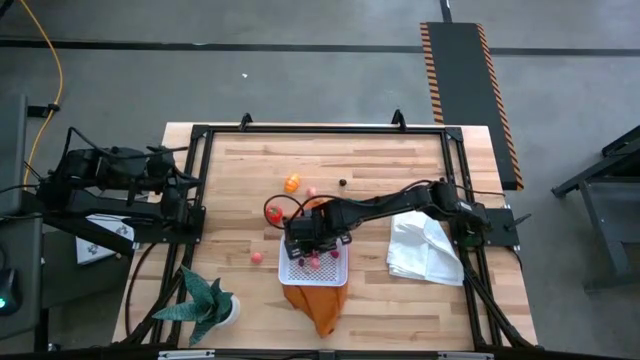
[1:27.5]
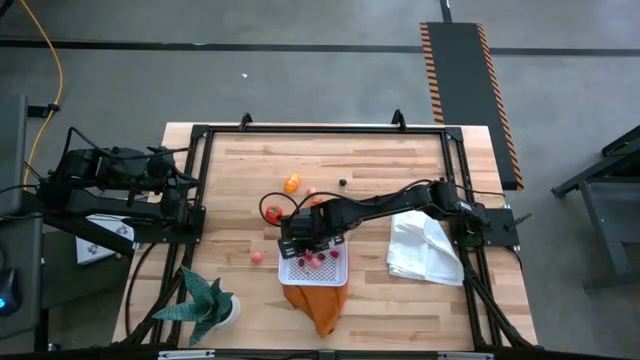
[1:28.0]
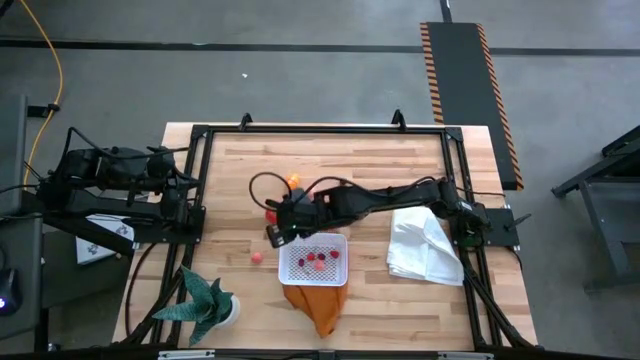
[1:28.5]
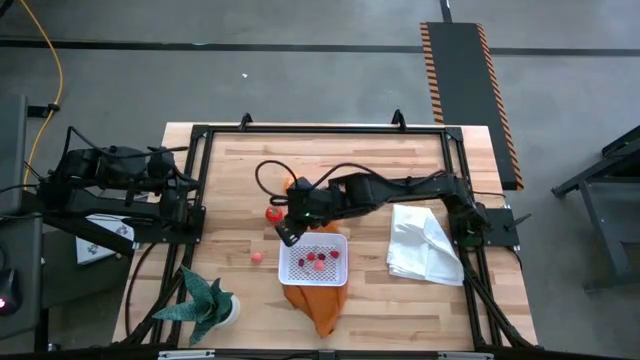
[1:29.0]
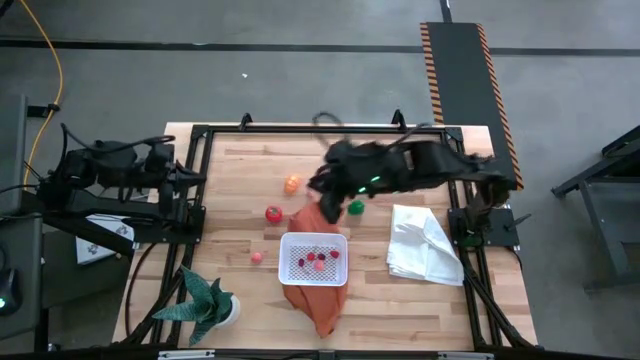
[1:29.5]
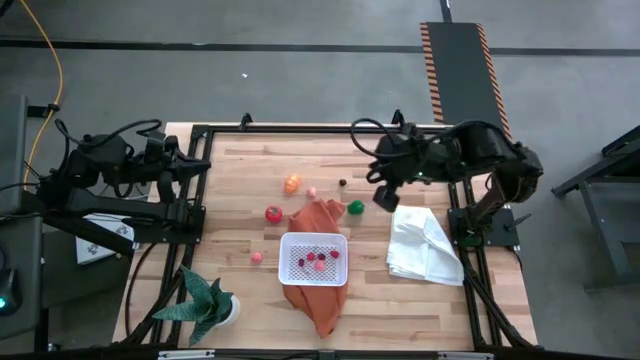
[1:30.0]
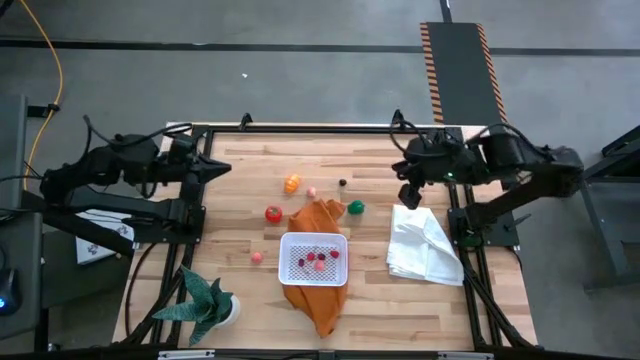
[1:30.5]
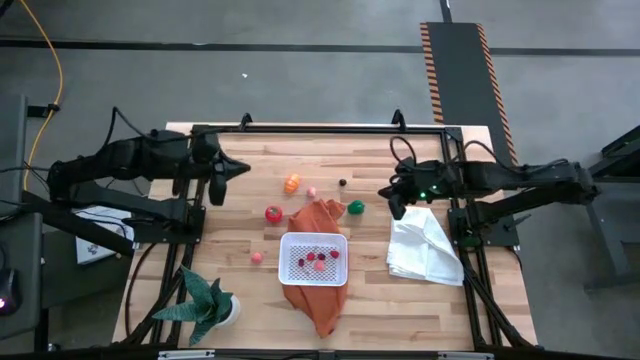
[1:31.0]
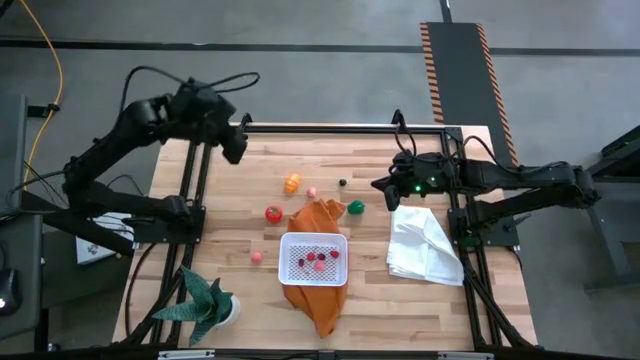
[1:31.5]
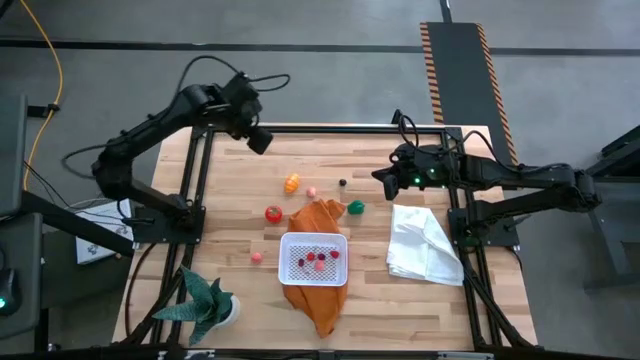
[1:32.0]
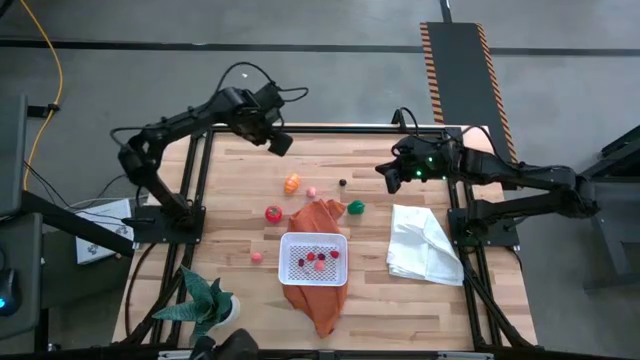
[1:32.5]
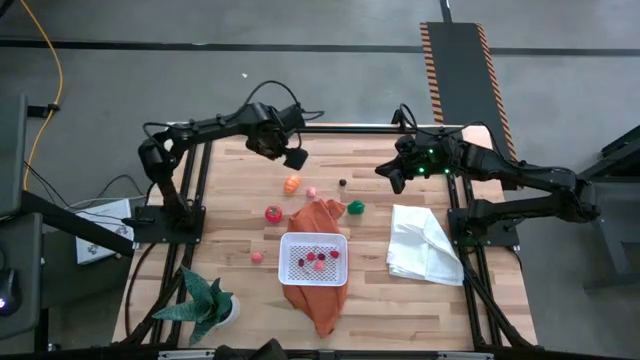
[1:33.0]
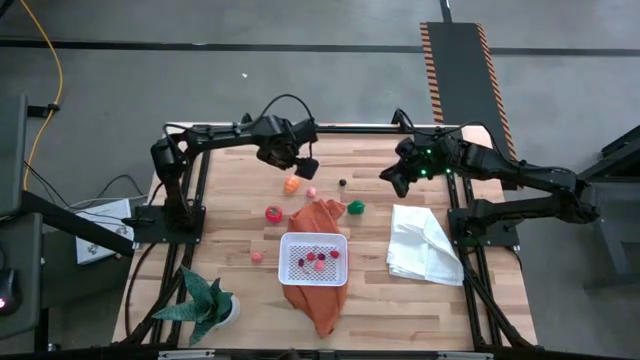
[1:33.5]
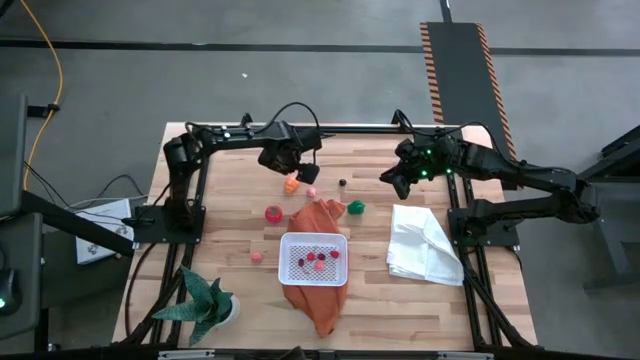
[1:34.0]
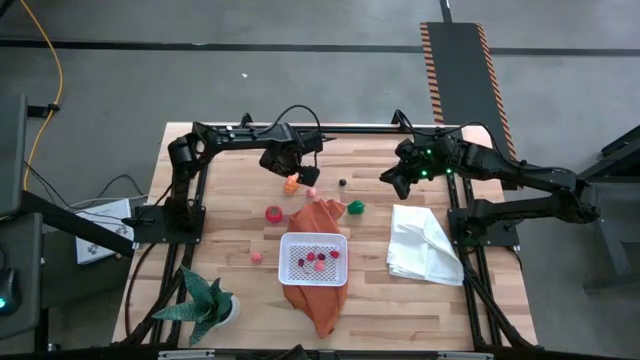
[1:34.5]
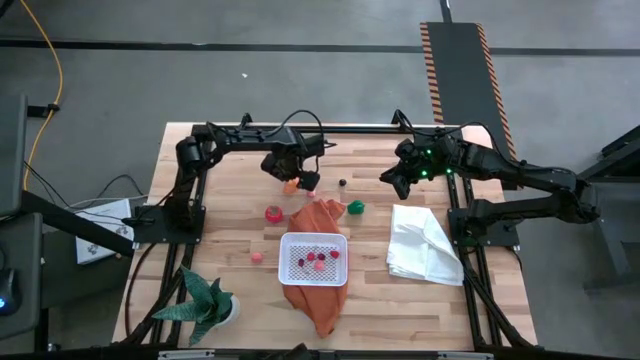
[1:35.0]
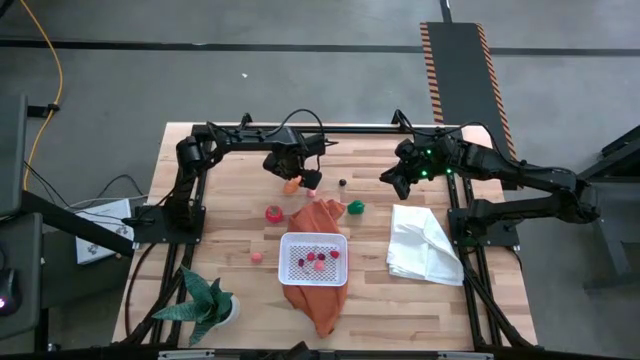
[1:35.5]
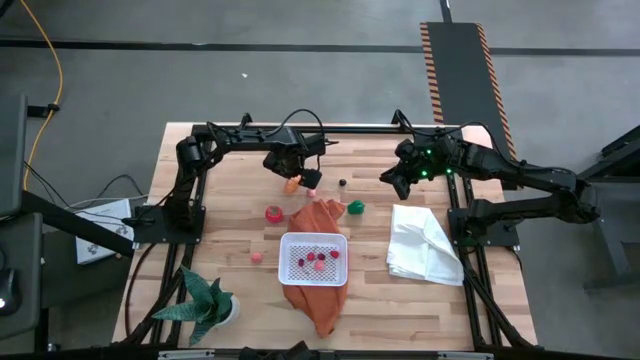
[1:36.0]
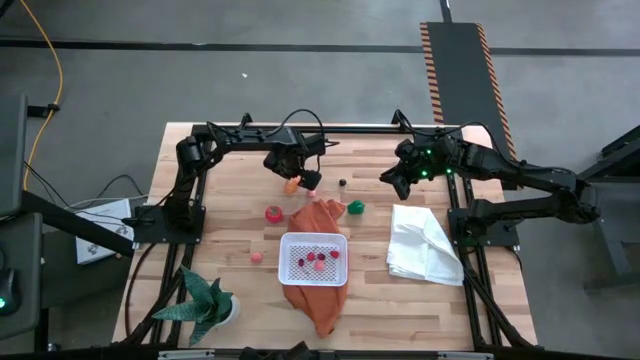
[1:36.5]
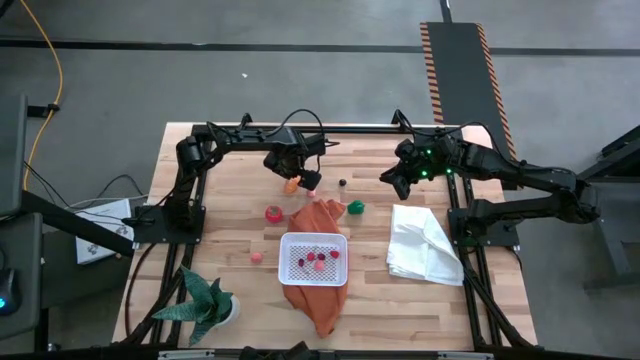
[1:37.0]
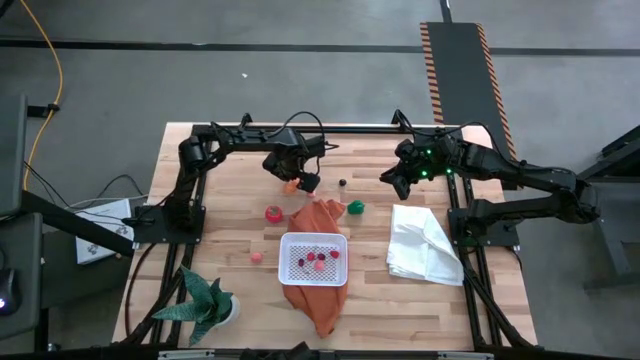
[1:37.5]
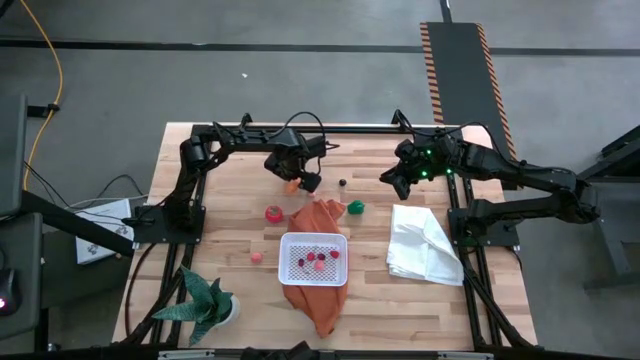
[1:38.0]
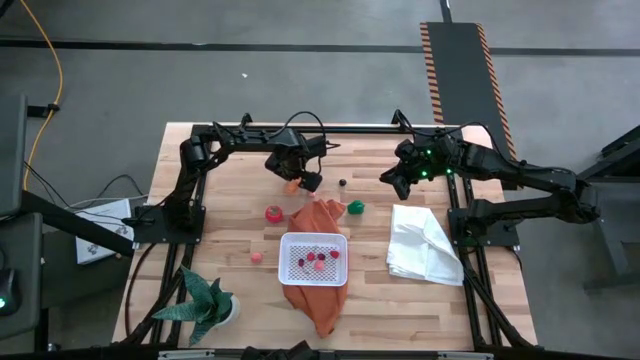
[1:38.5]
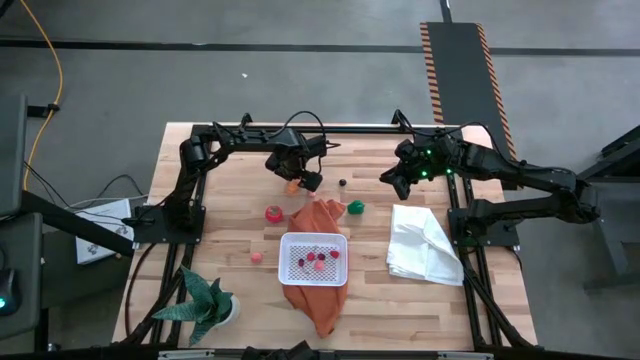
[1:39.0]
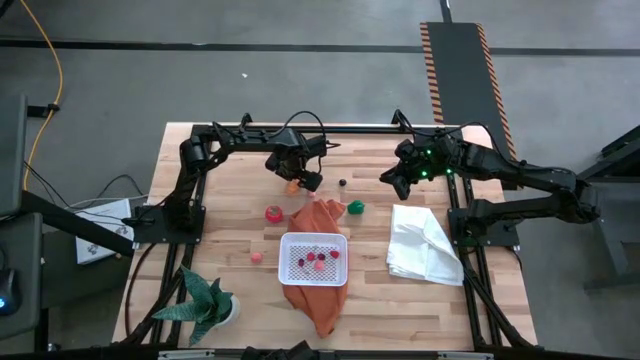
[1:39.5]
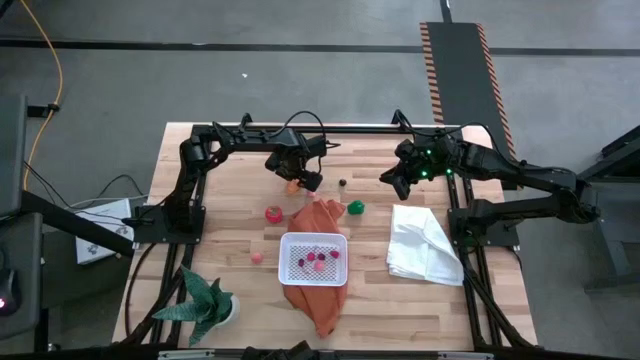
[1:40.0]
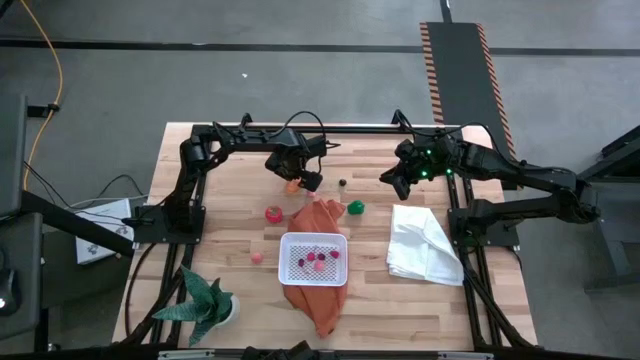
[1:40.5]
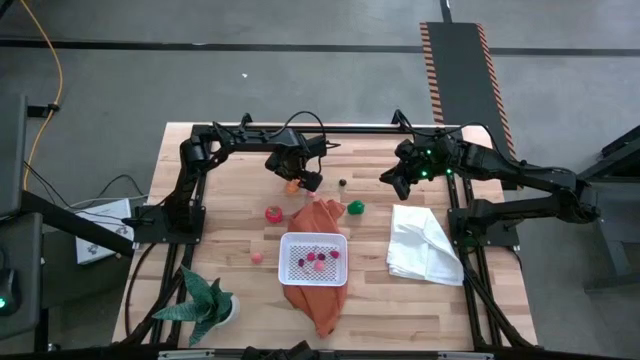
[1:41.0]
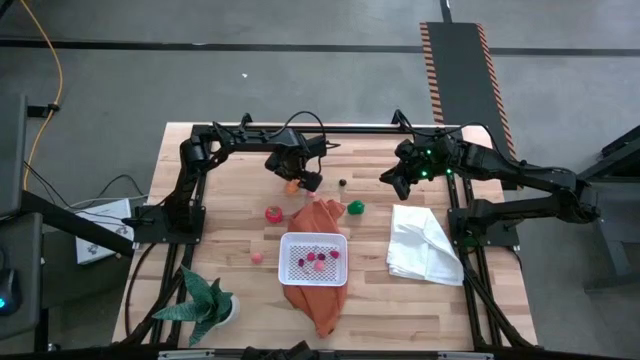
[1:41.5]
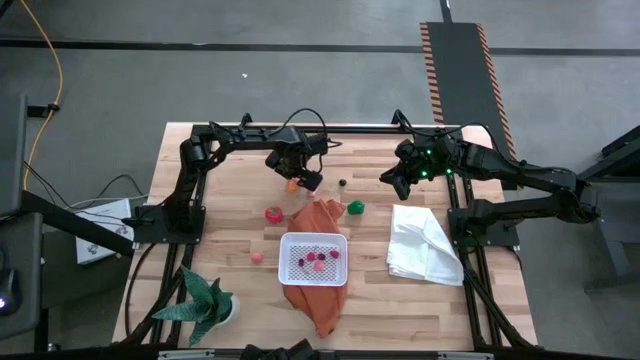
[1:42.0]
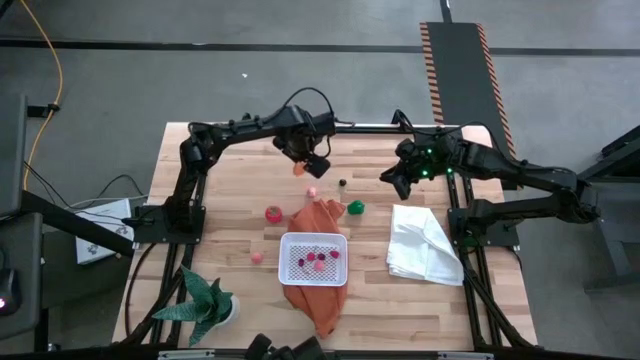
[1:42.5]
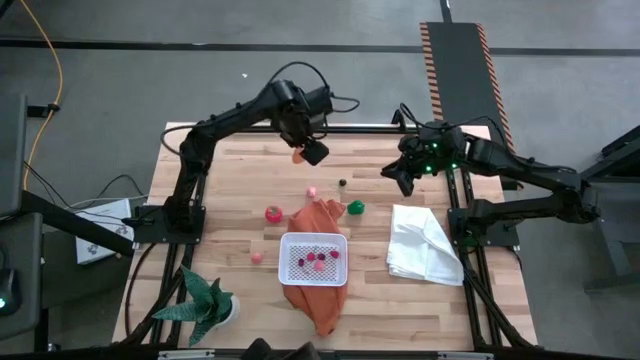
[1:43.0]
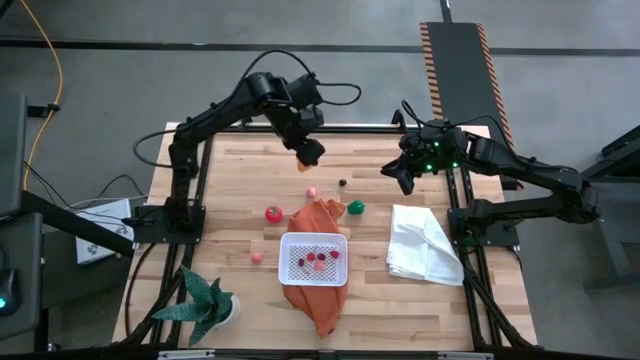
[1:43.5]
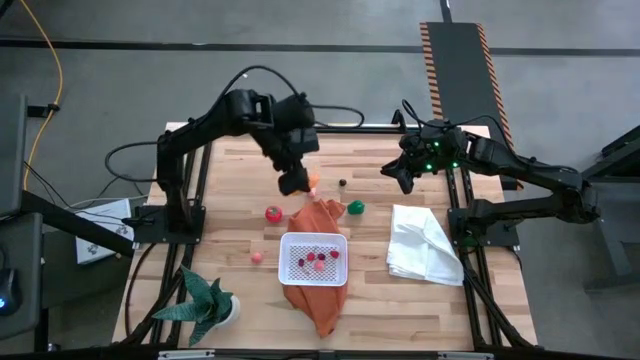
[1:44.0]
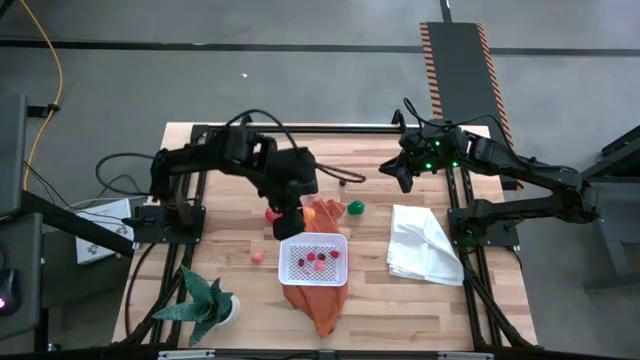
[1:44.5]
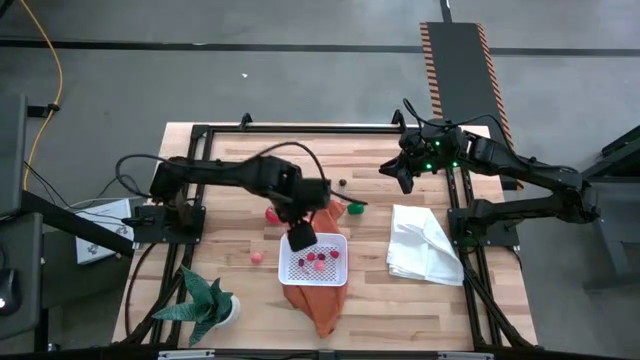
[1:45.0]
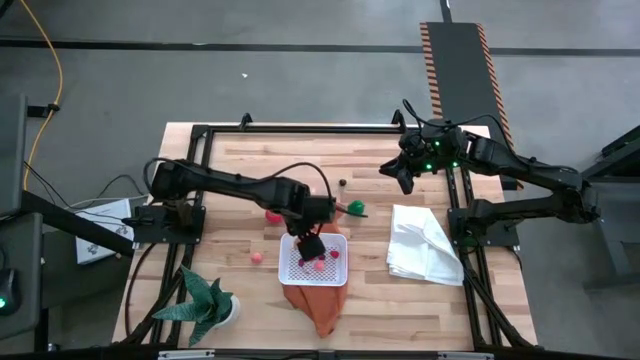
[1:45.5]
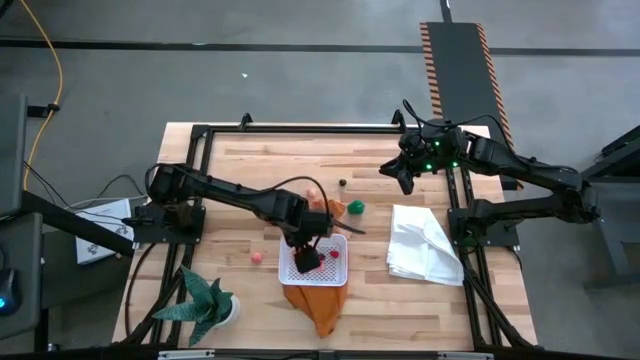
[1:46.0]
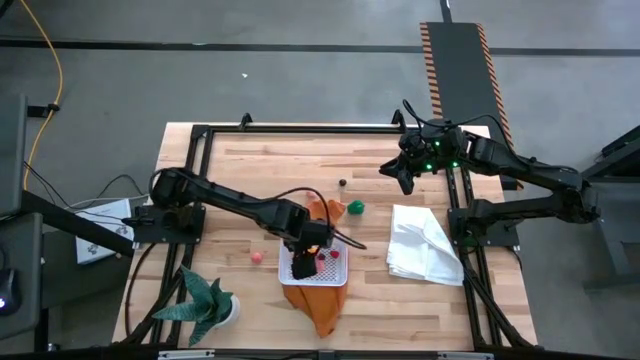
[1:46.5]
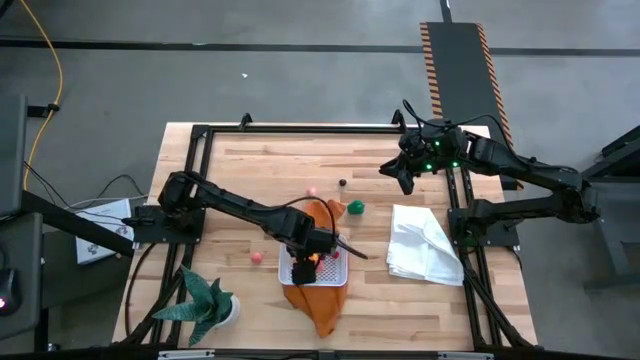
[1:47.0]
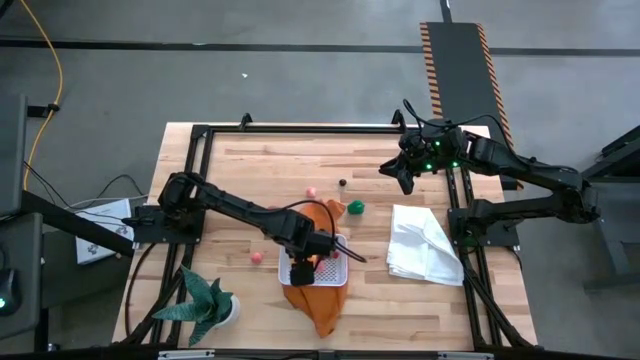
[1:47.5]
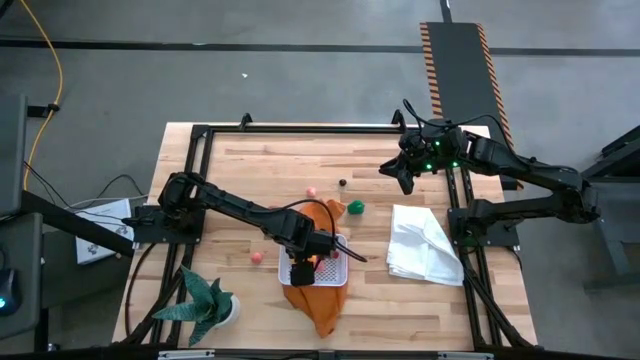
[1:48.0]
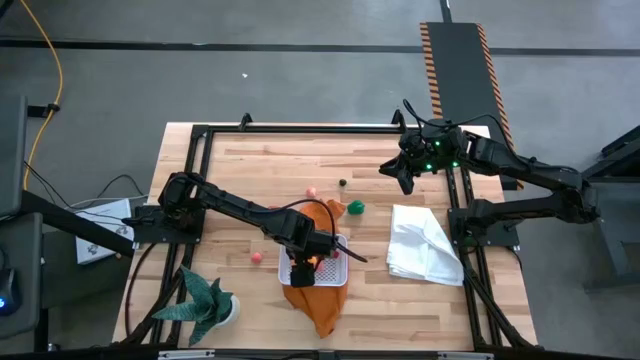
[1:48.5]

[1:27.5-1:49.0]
Task: Pick and placing Produce into tupperware
Put the yellow croissant into the white basket
